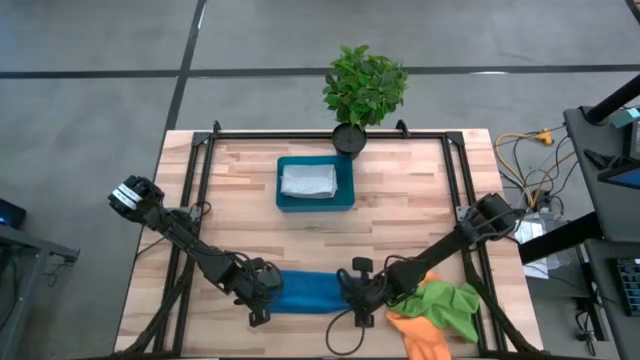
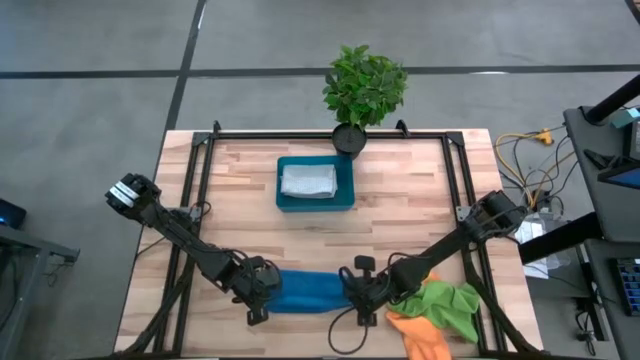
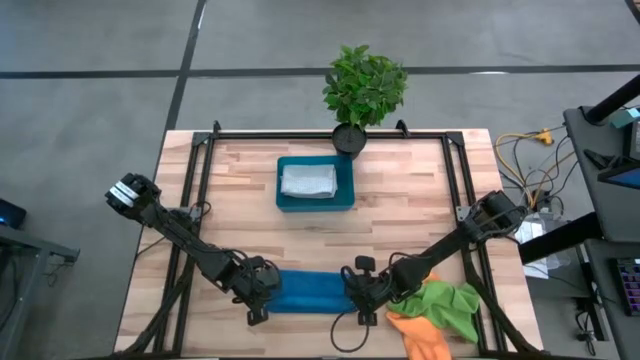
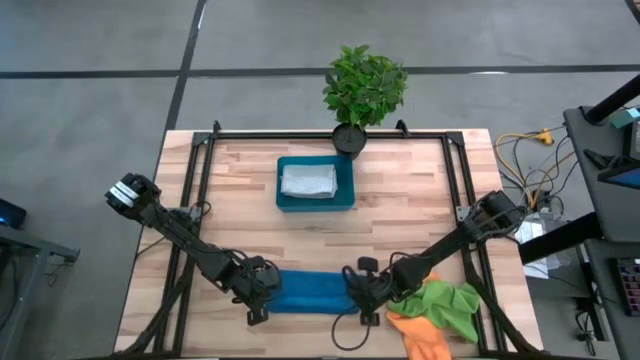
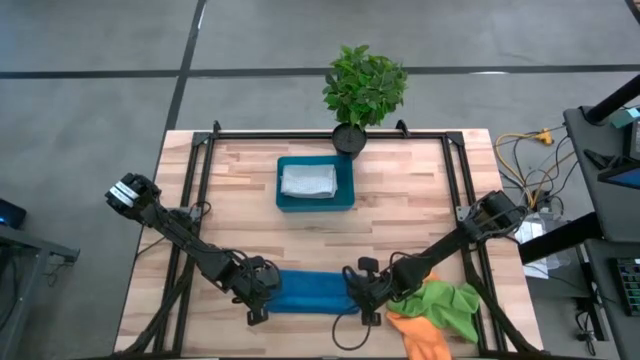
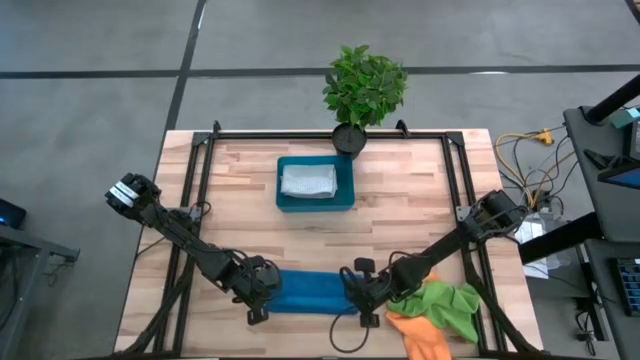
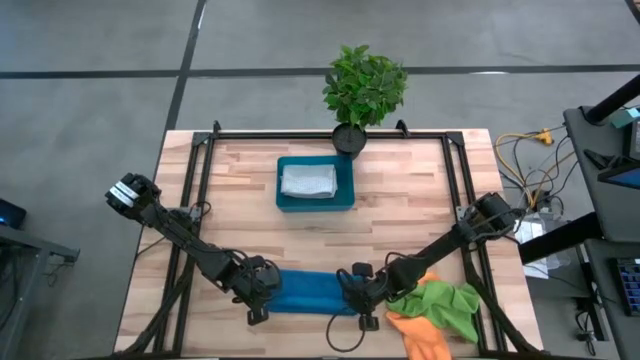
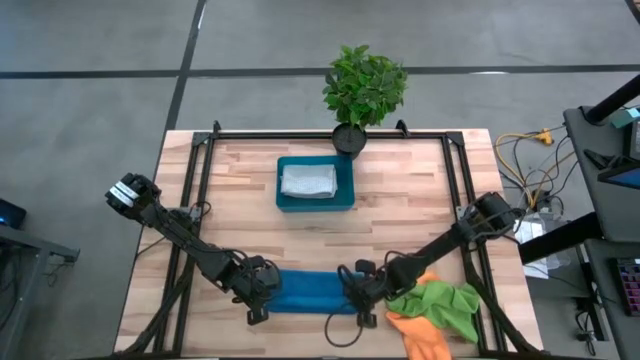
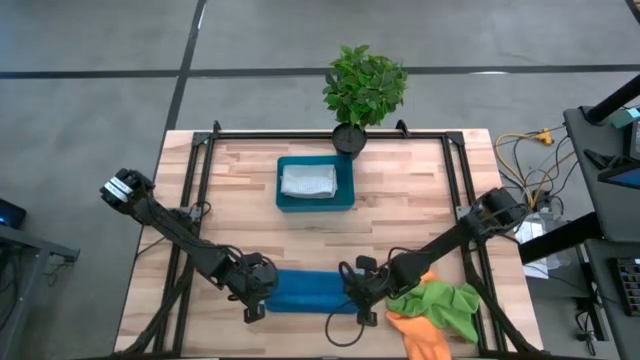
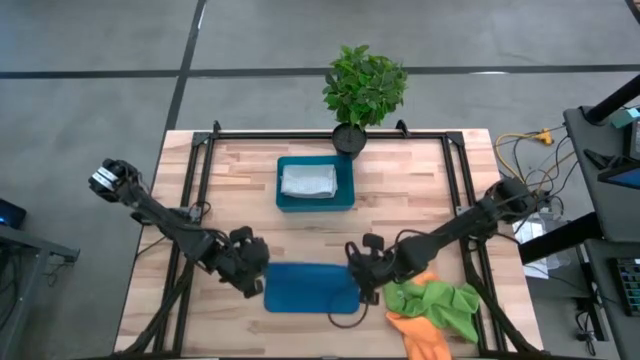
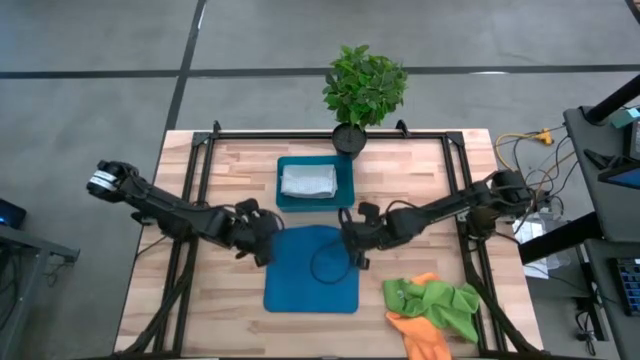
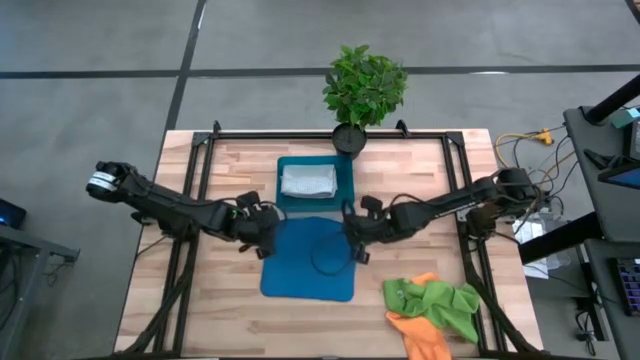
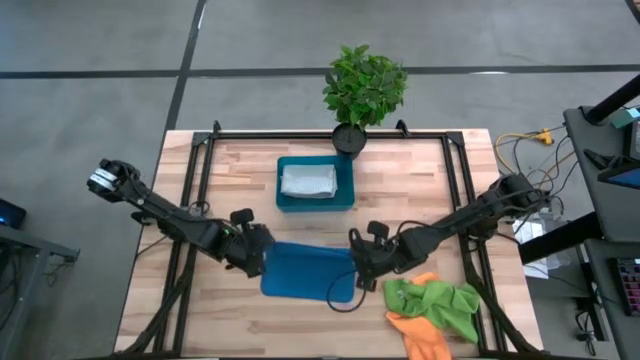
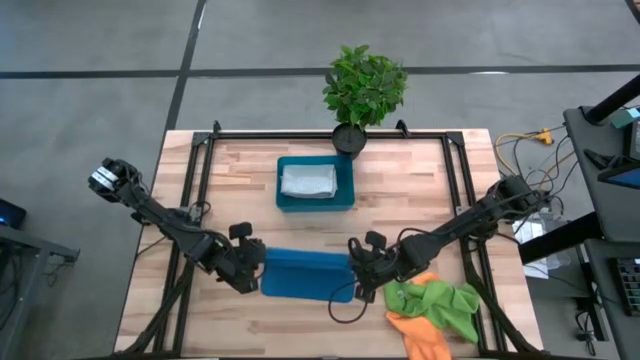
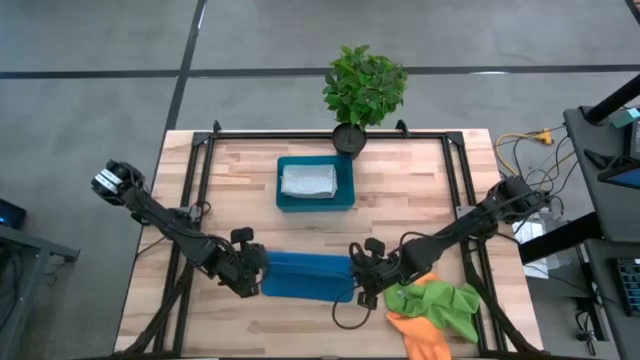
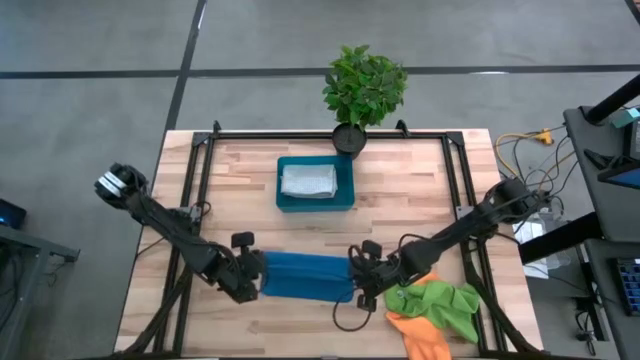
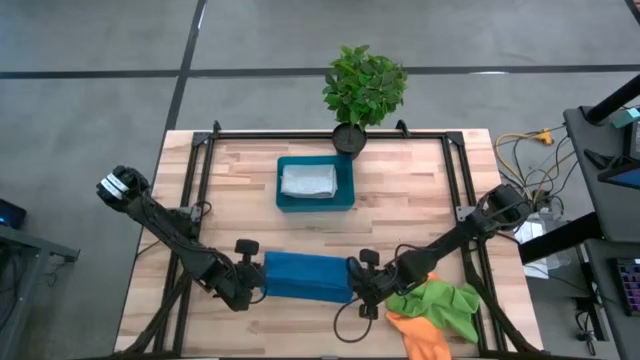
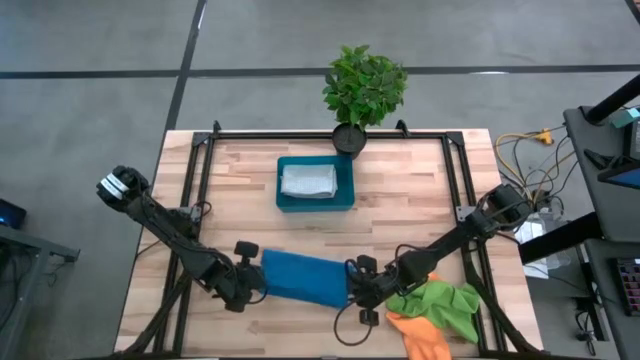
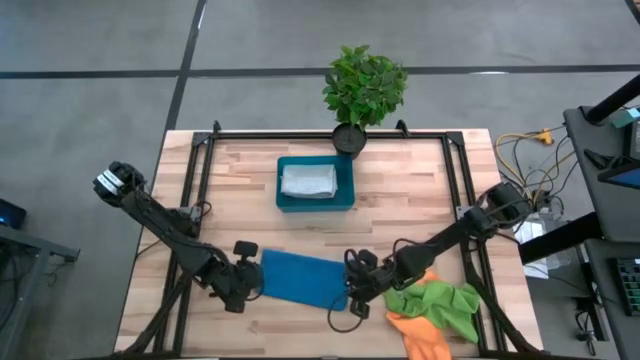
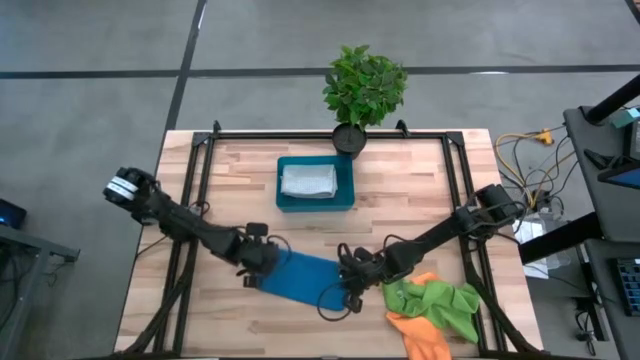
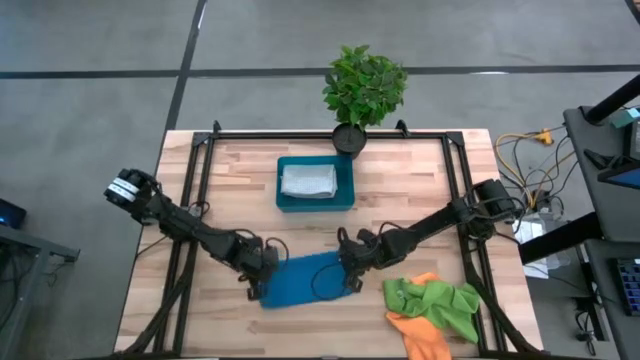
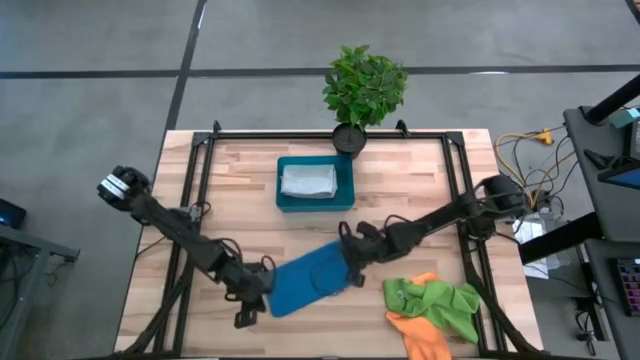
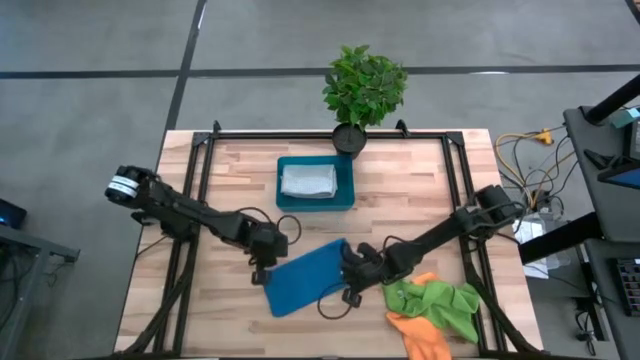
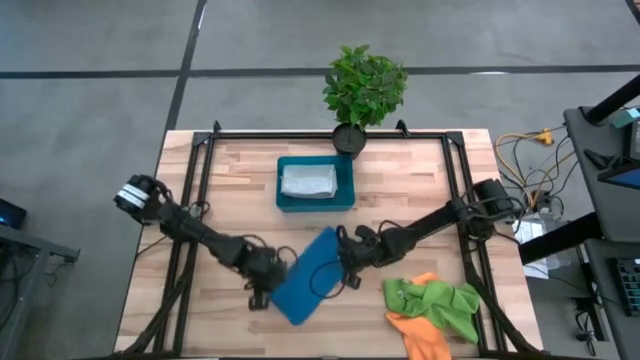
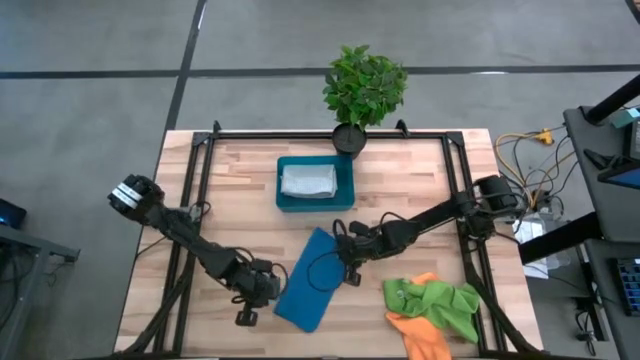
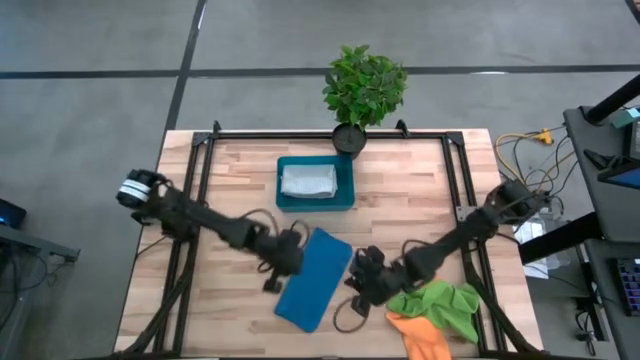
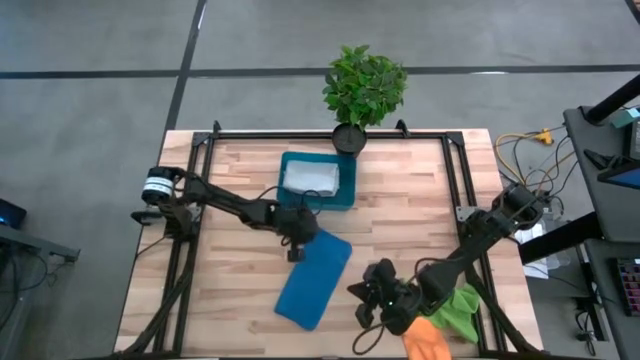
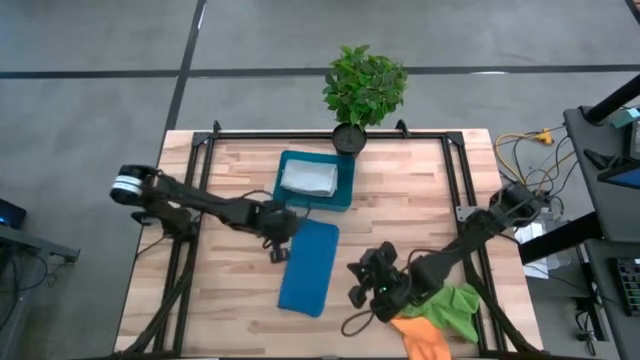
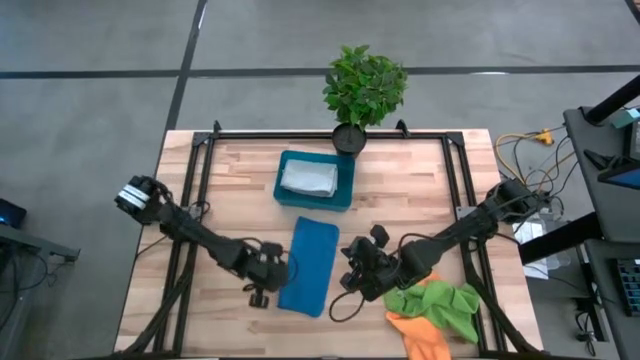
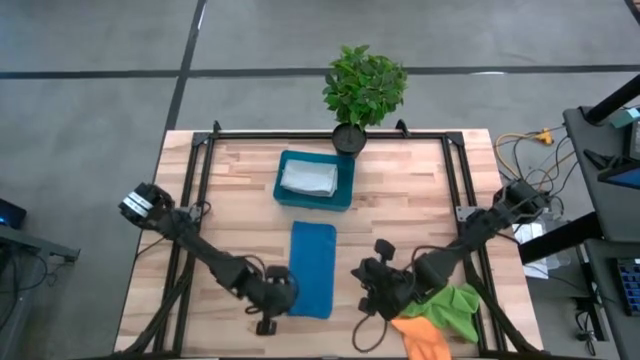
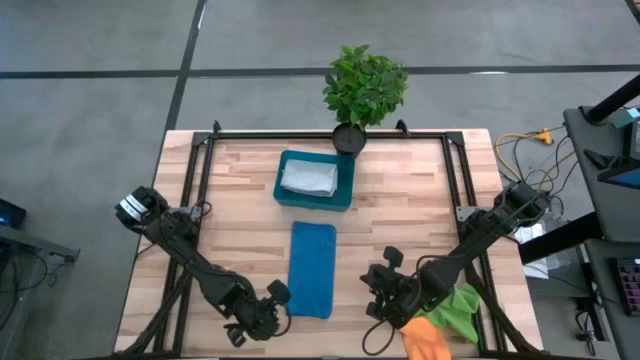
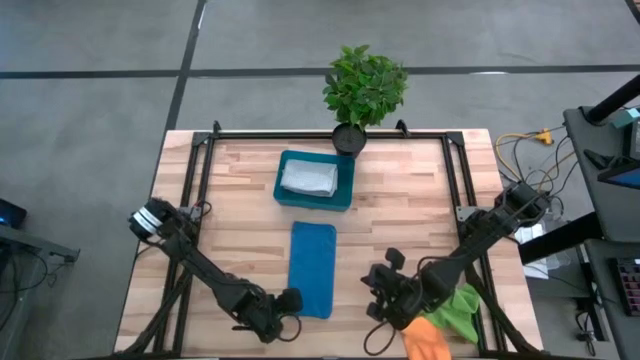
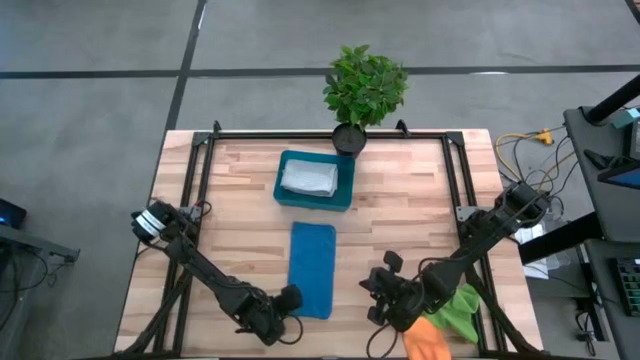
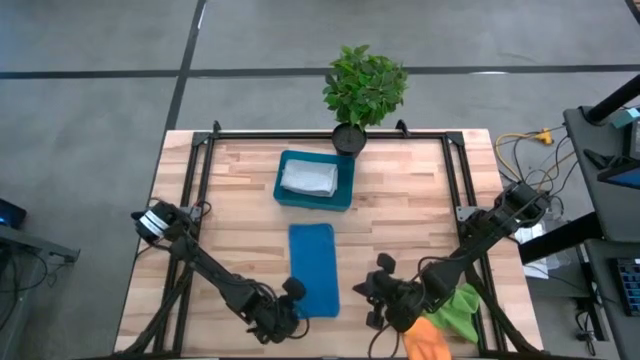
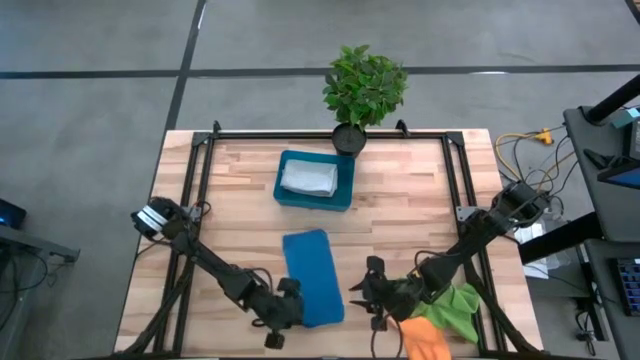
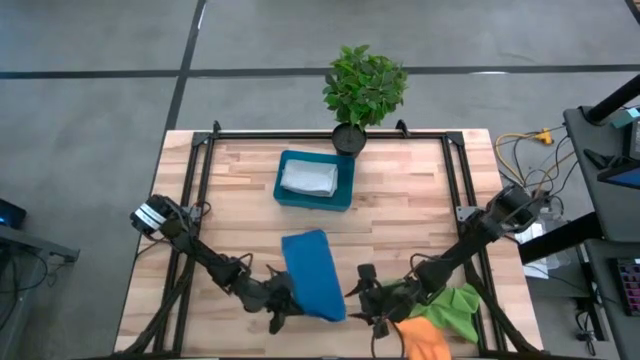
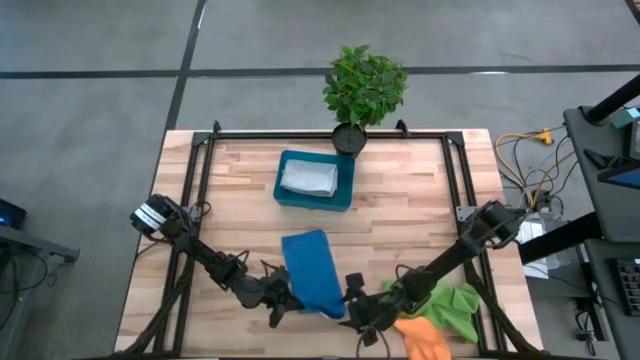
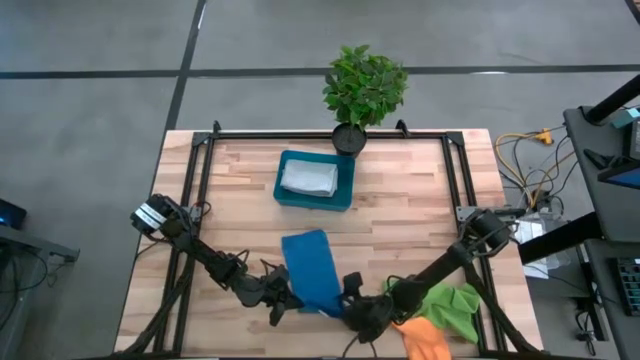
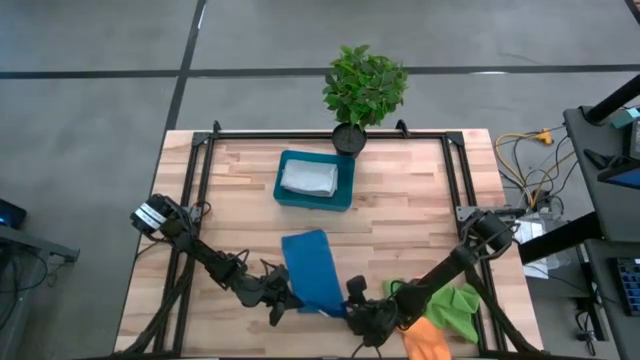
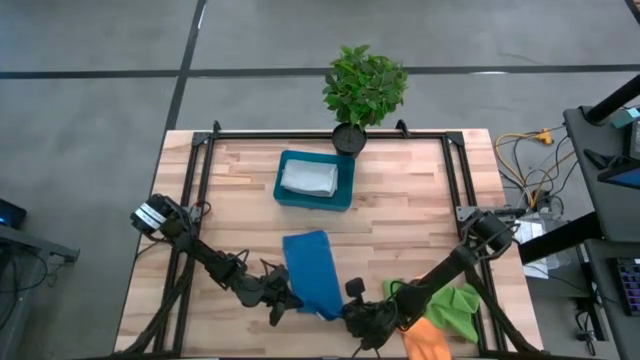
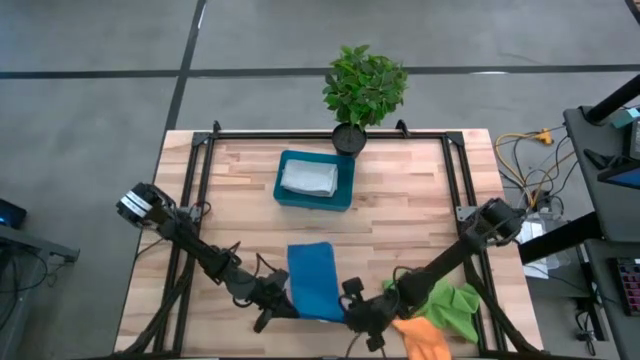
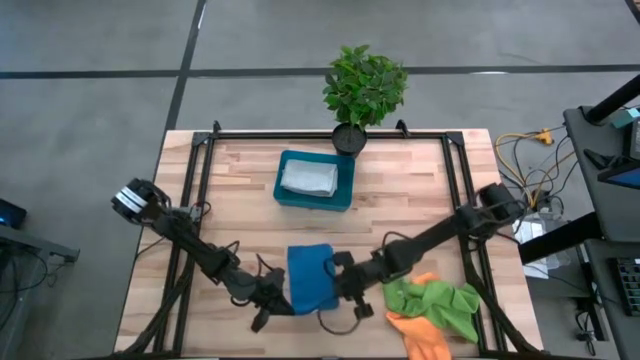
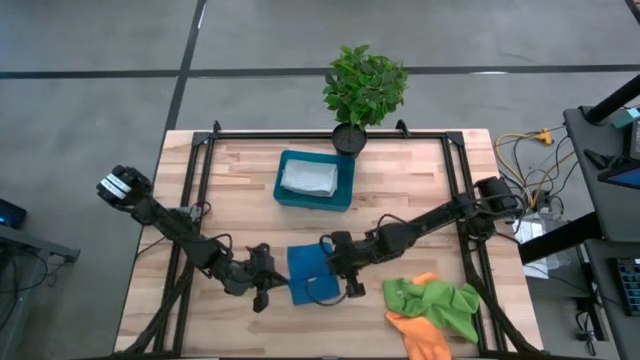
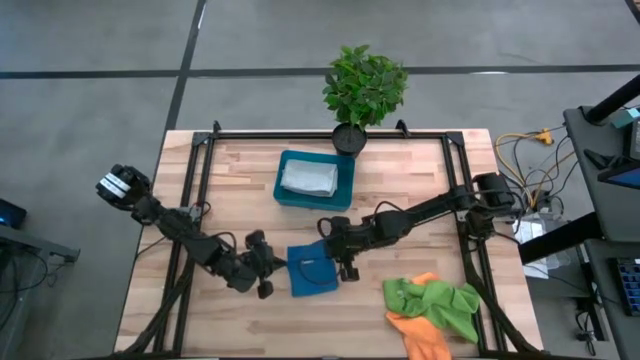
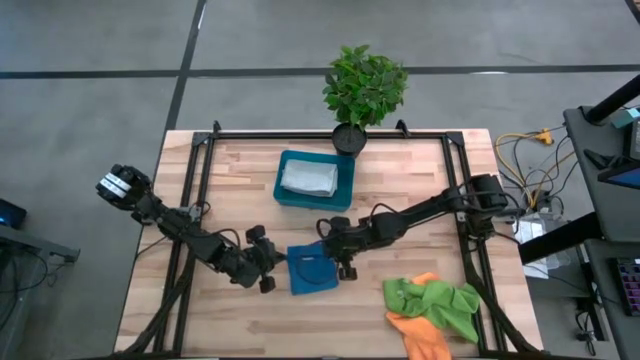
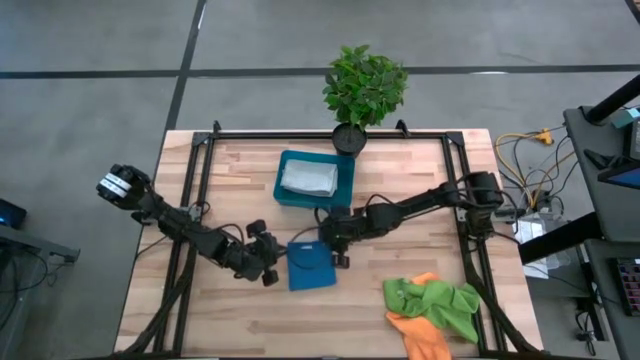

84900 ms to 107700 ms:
Task: Fold microfiber towels
Fold the blue microfiber towel
